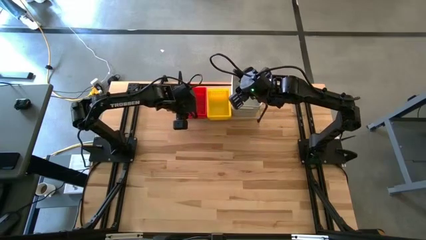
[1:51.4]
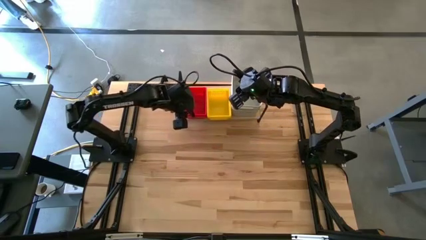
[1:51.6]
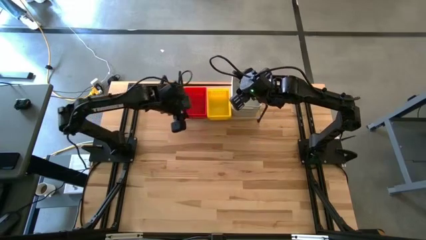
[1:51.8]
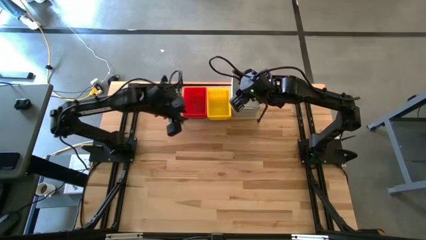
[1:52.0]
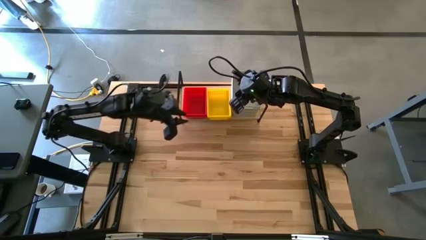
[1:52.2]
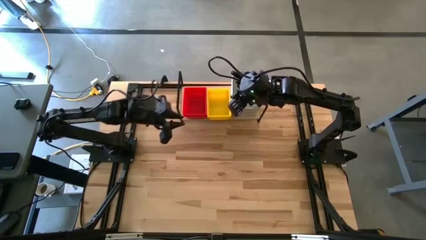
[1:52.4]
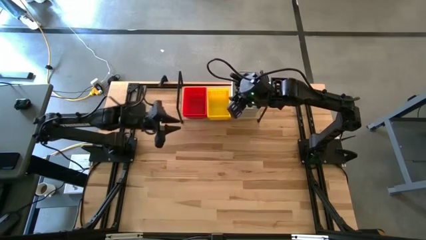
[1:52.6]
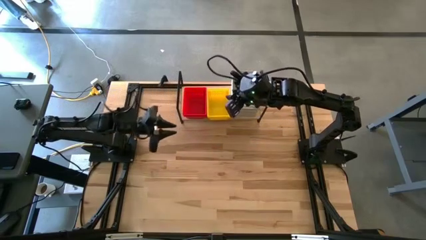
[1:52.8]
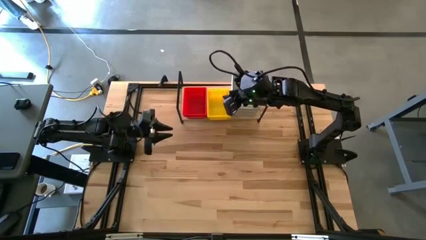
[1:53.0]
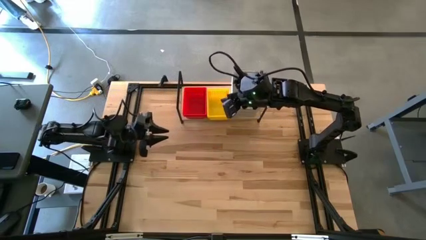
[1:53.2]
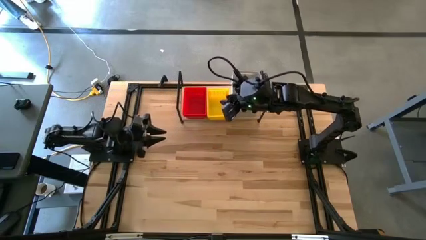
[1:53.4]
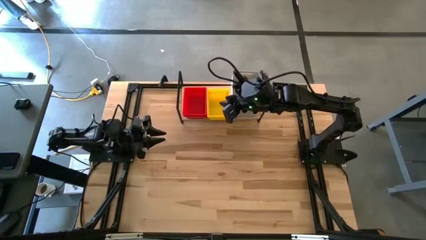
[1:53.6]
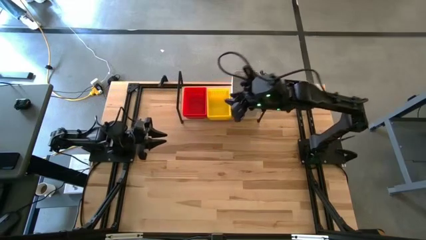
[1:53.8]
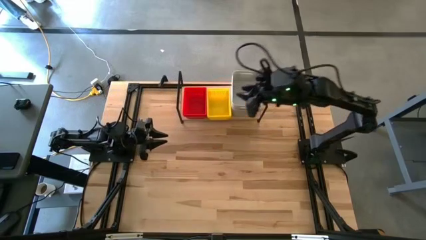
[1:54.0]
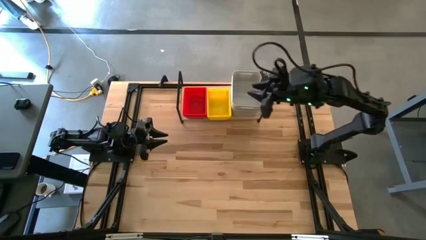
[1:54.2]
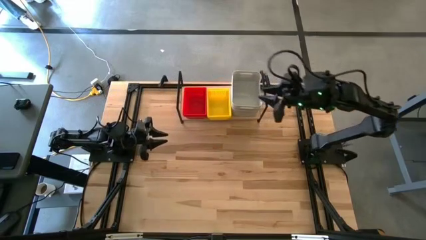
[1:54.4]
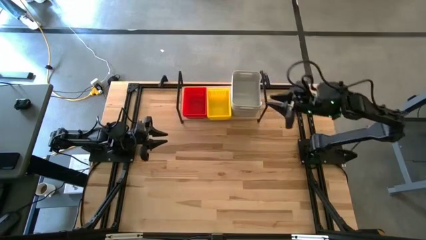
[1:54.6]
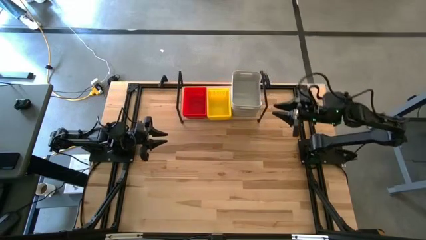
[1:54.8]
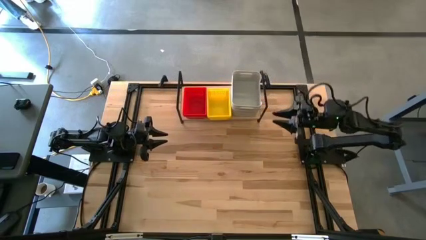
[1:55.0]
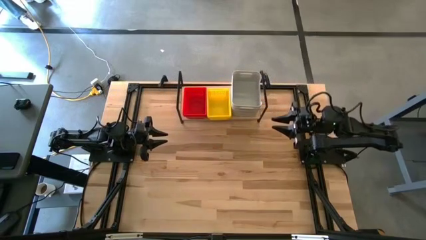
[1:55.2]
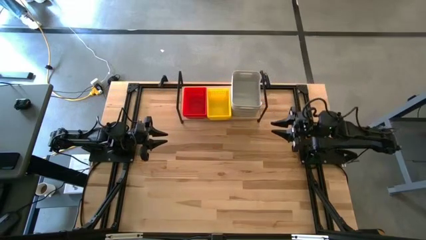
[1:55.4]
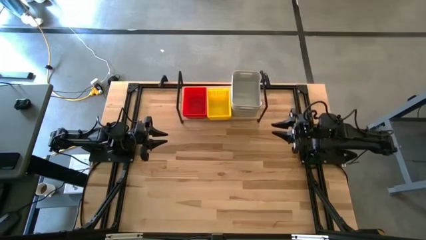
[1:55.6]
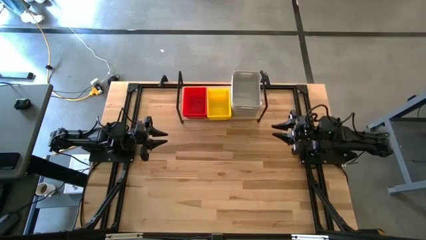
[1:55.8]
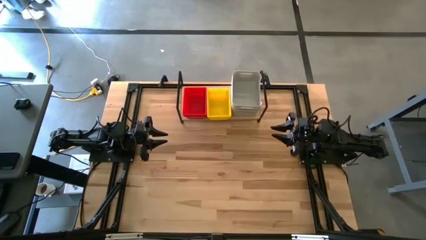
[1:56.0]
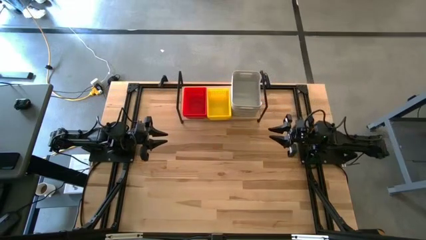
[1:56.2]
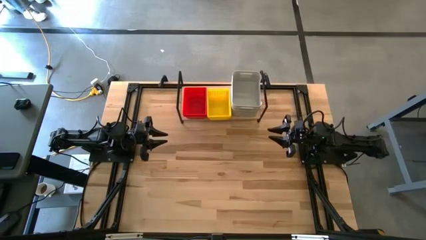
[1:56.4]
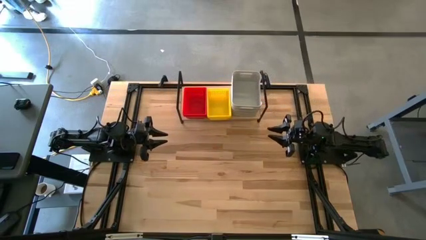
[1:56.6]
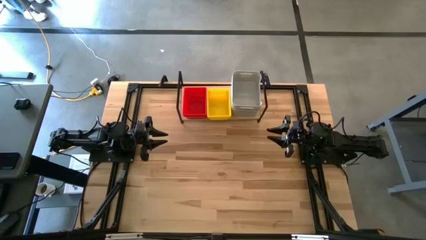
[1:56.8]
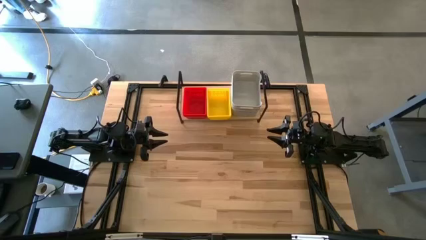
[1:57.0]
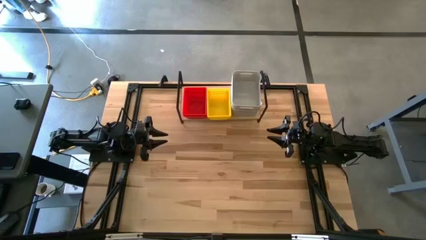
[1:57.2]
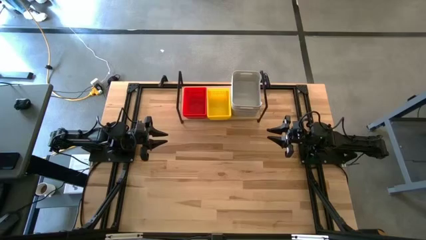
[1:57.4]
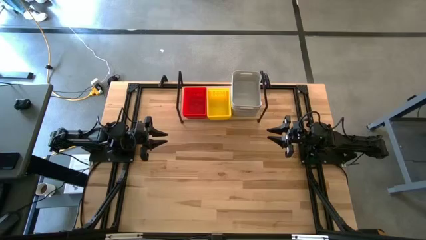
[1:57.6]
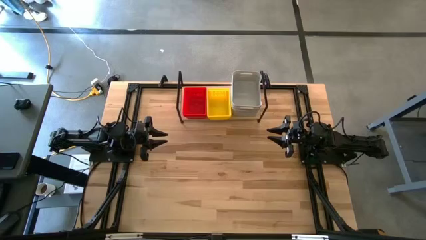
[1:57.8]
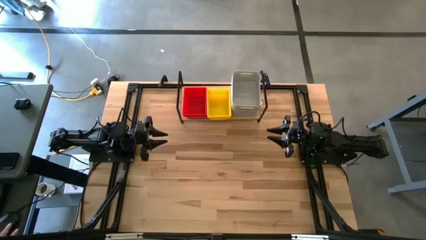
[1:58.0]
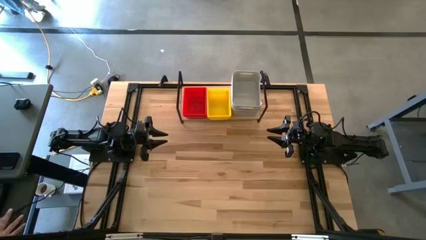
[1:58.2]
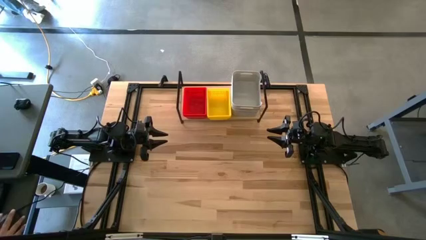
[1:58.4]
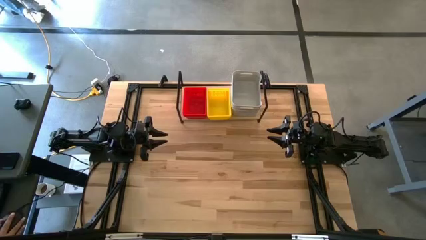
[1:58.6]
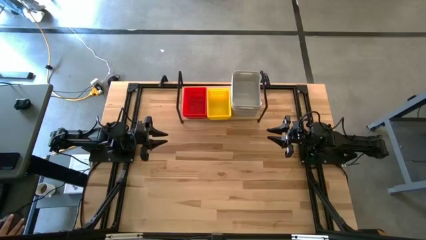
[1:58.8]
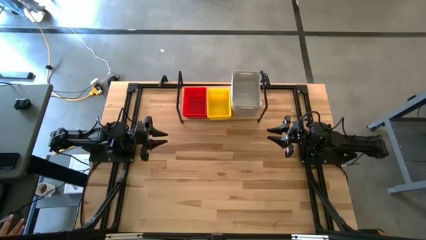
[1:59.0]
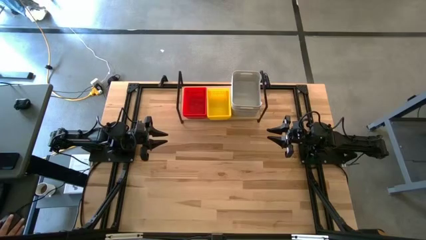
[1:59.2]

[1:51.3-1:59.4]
Task: Stack baskets on shelf by color
Return to Home Position

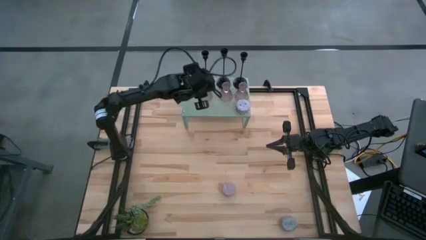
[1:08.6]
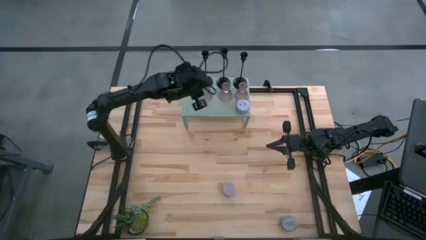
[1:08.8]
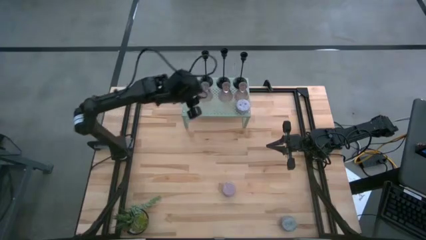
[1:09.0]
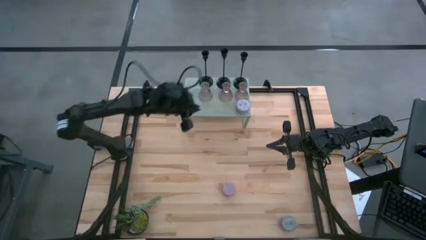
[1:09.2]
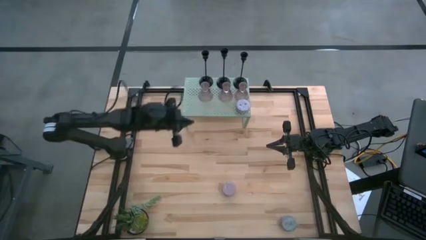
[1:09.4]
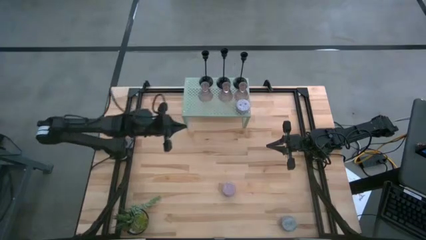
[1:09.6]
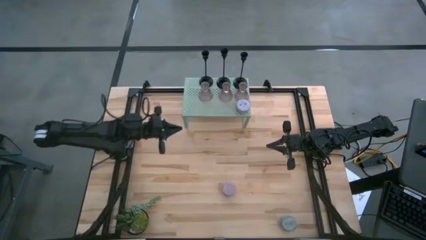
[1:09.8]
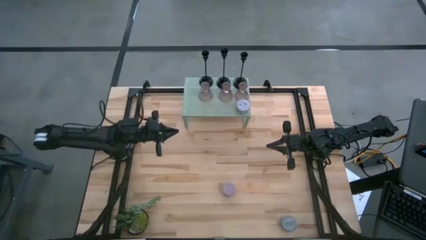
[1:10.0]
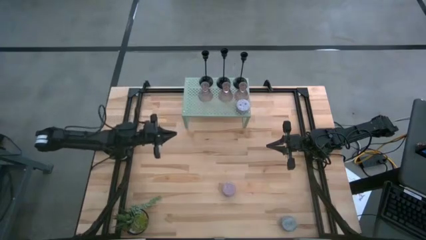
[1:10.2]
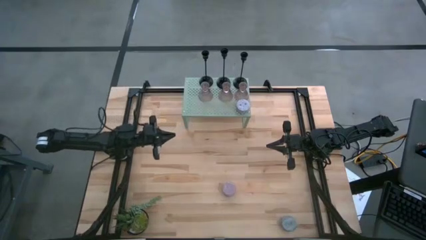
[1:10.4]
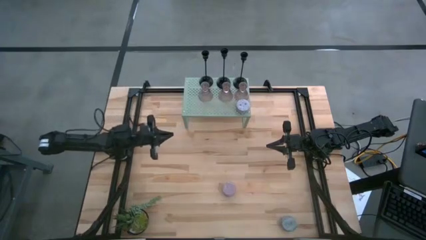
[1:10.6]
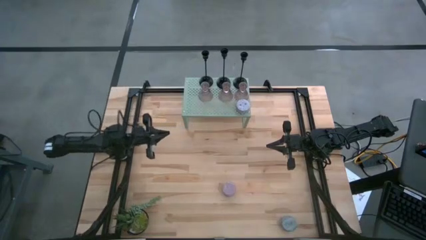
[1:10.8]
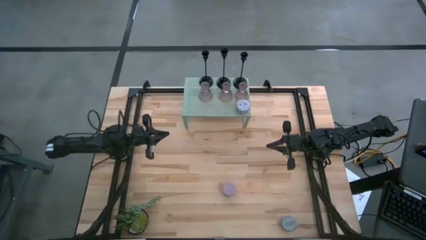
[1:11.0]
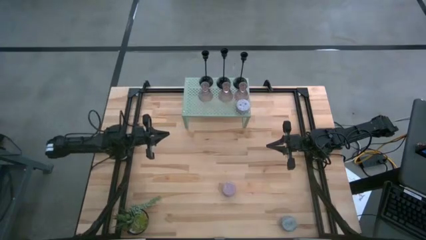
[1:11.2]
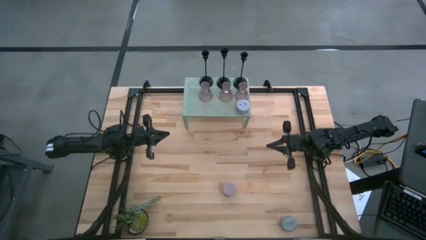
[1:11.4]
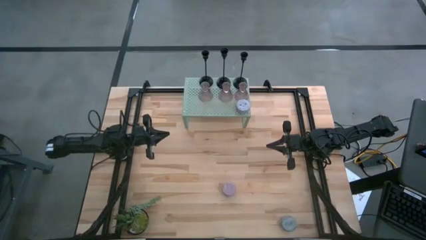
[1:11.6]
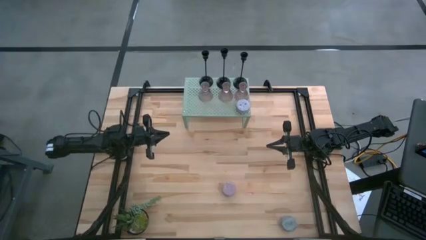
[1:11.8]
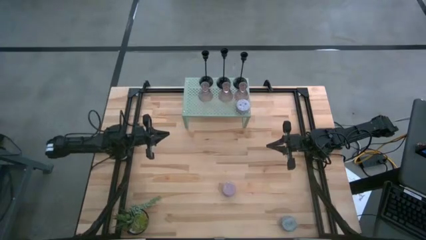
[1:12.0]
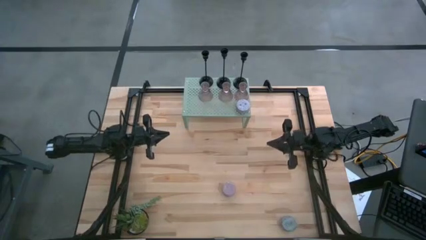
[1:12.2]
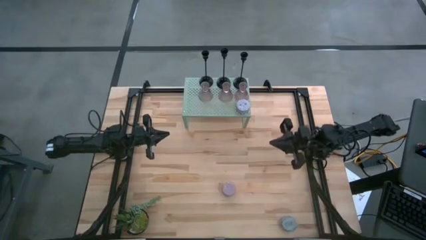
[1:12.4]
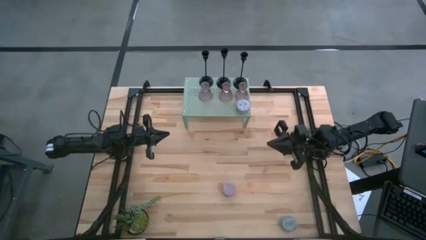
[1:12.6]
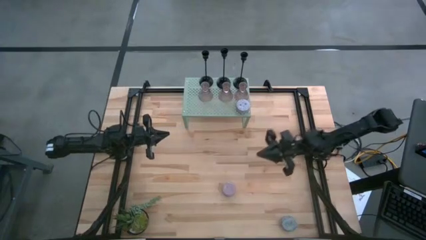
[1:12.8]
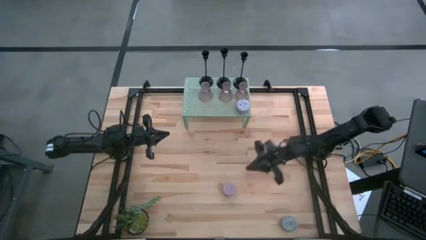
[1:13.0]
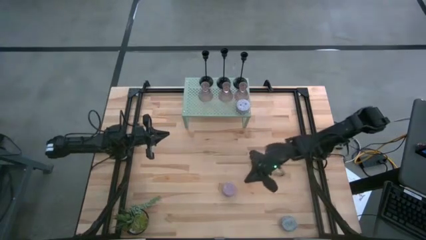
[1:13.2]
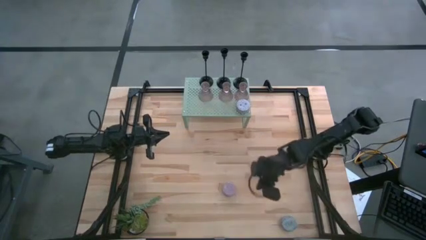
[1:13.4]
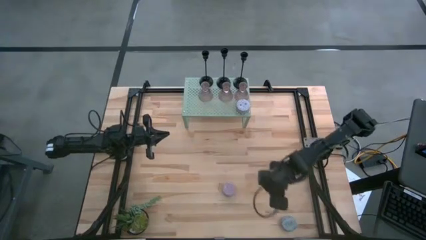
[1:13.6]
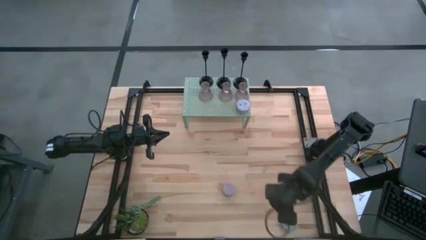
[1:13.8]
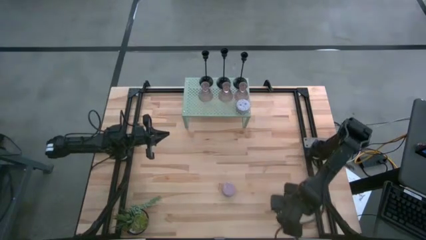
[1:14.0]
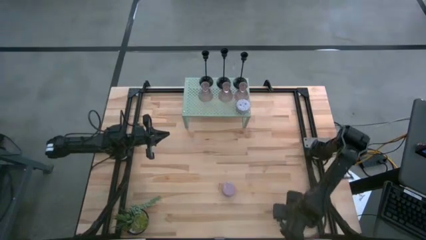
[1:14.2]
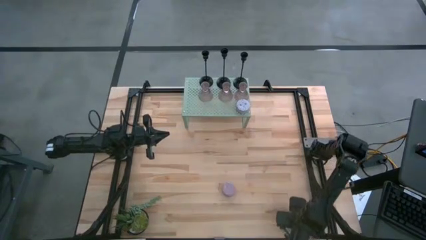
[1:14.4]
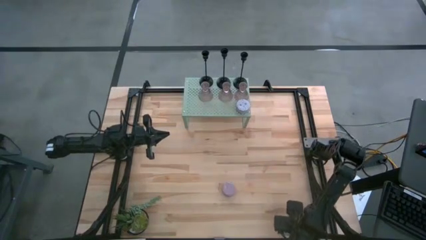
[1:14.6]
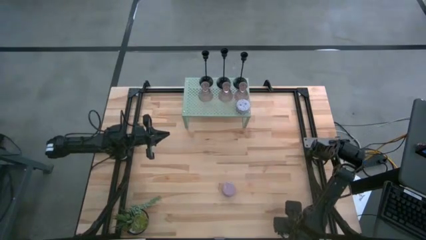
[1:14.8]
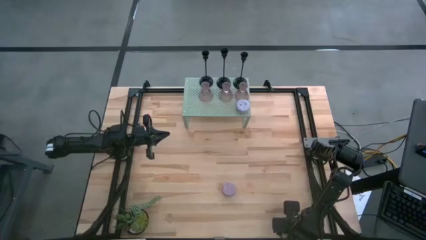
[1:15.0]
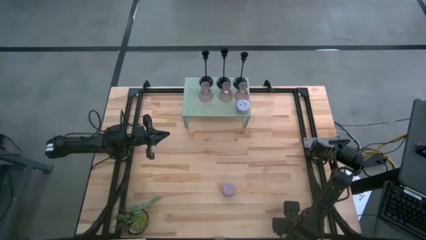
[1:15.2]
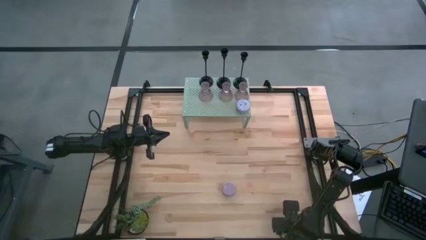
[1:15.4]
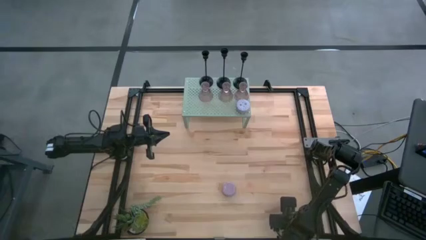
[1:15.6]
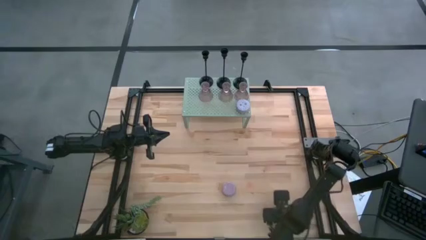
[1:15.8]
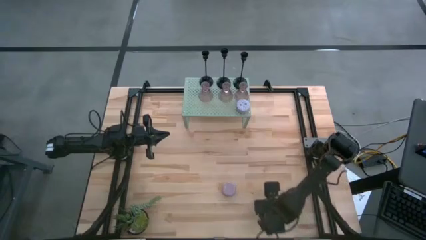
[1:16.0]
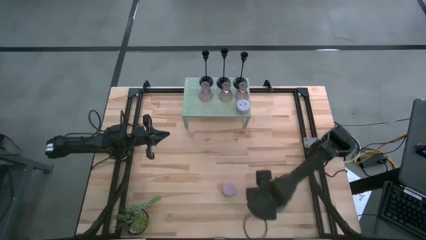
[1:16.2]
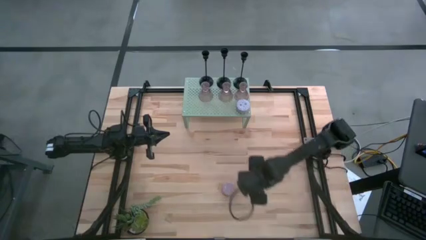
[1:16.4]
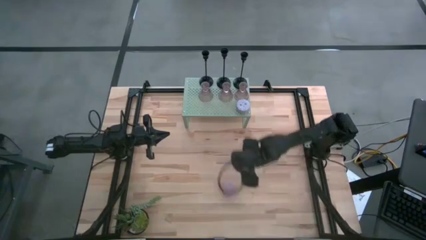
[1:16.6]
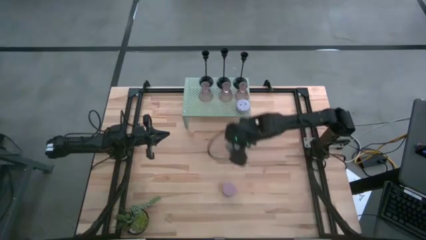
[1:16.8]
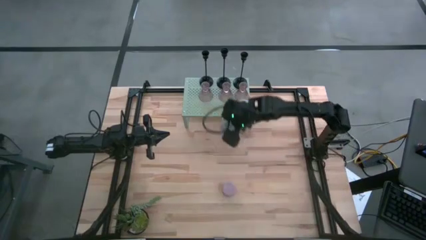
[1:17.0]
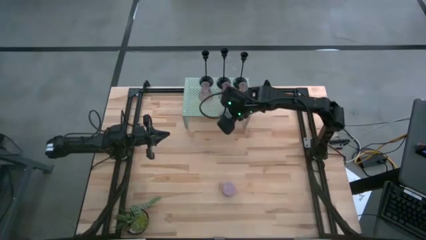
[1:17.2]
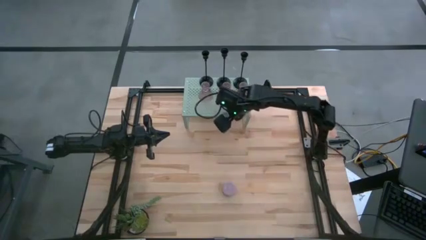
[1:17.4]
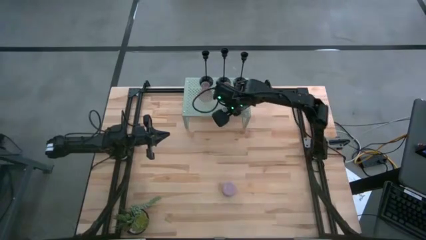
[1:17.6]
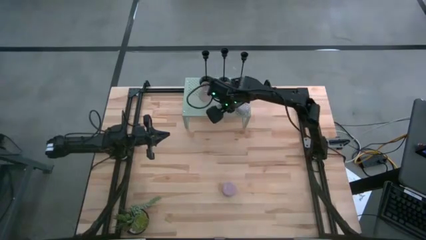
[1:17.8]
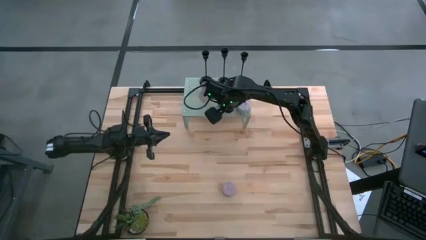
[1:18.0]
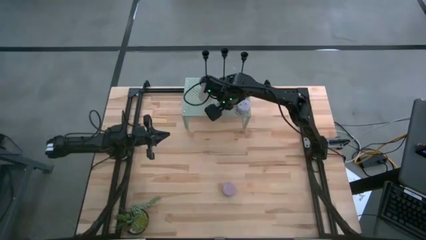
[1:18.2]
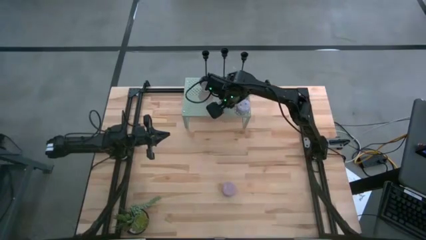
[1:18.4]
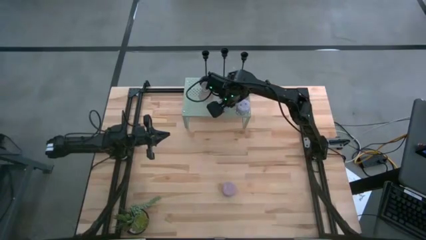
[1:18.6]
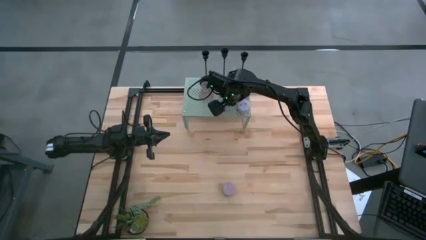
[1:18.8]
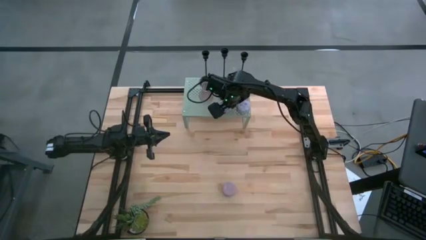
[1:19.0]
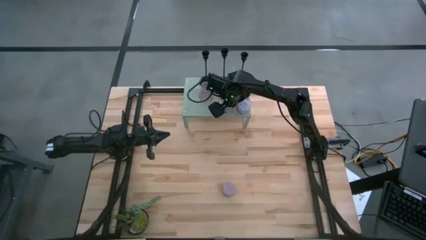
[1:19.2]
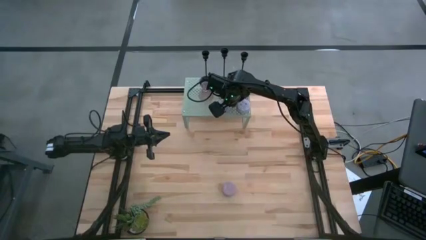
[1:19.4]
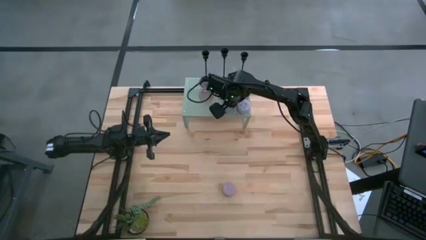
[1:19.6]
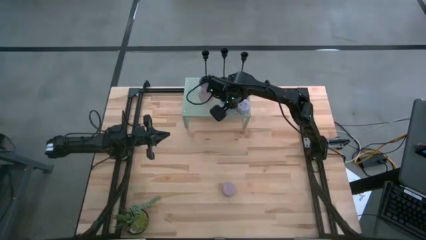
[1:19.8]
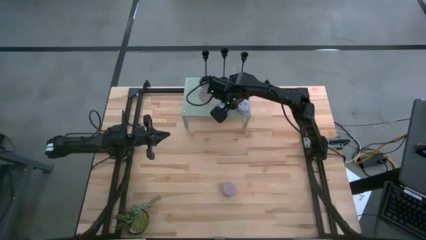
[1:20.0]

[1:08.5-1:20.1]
Task: Pick & Place candle stick holders
Put the green scented candle on the shelf
